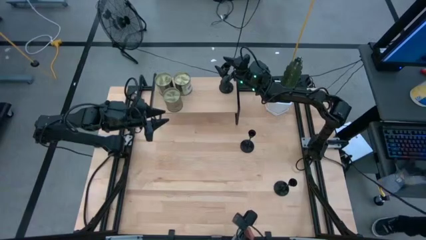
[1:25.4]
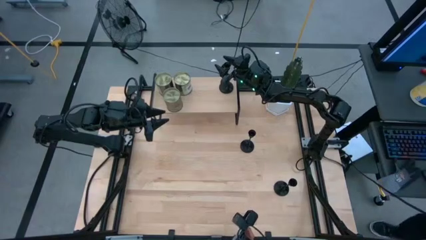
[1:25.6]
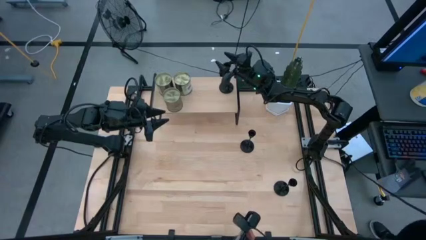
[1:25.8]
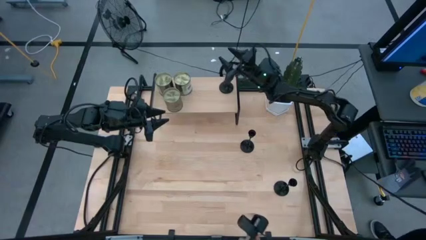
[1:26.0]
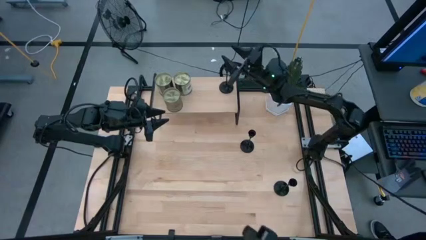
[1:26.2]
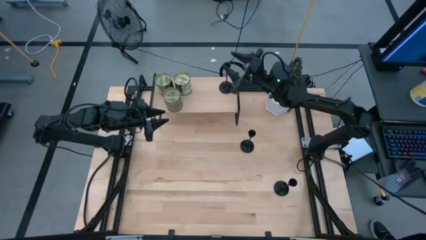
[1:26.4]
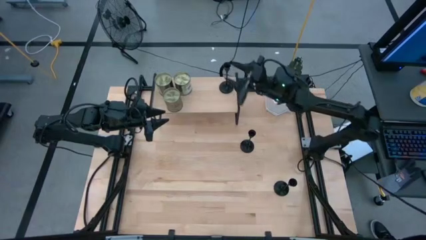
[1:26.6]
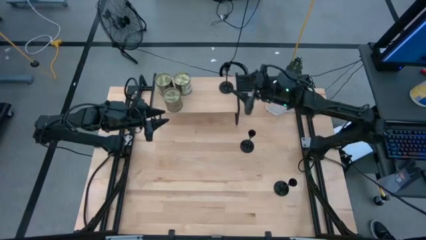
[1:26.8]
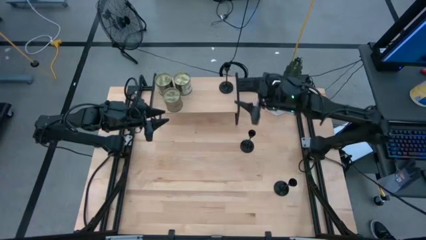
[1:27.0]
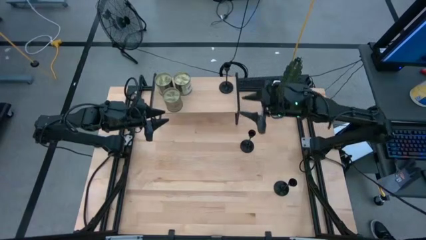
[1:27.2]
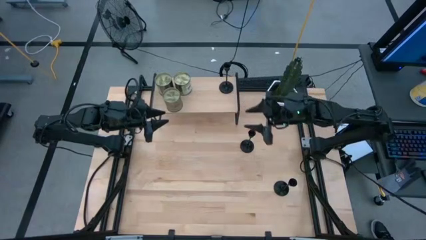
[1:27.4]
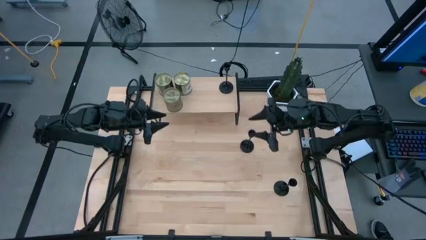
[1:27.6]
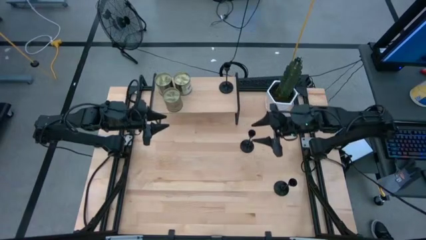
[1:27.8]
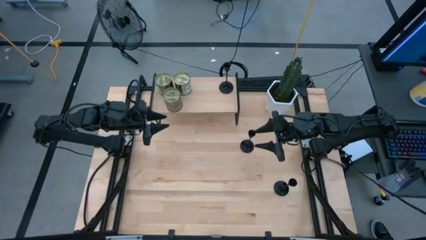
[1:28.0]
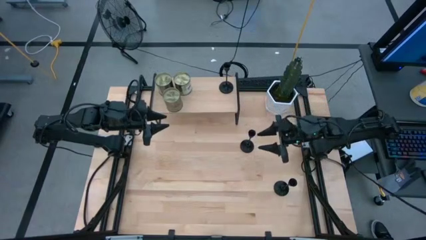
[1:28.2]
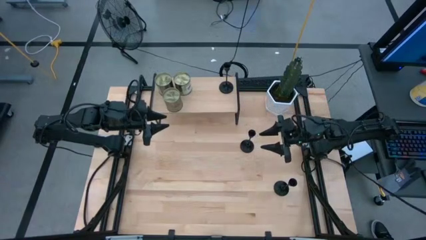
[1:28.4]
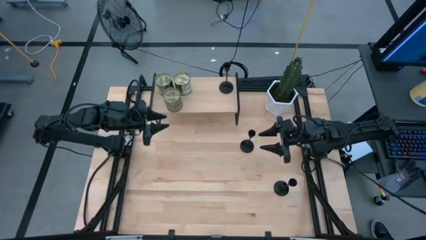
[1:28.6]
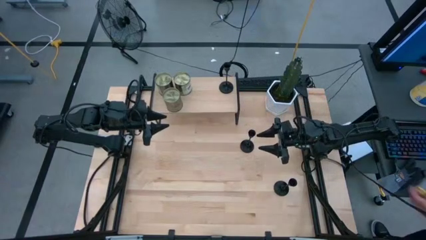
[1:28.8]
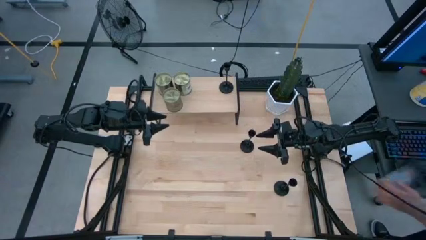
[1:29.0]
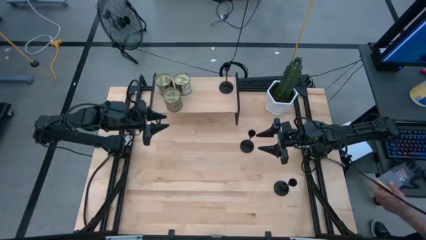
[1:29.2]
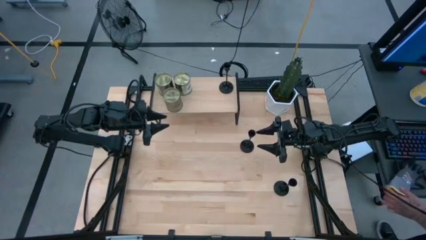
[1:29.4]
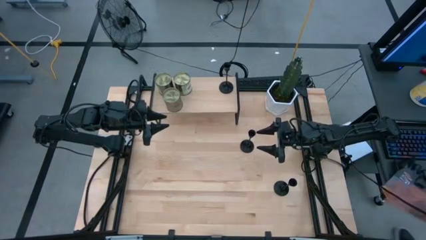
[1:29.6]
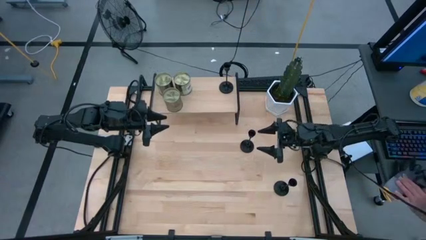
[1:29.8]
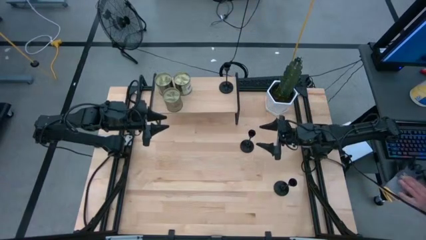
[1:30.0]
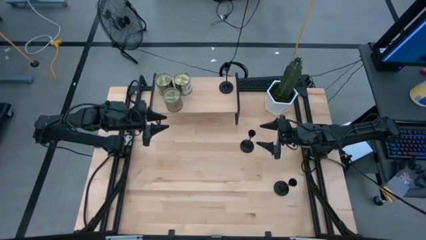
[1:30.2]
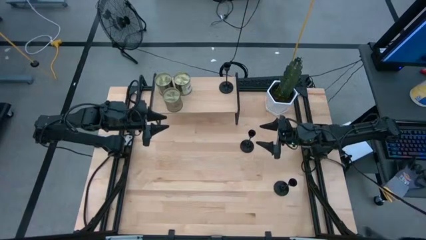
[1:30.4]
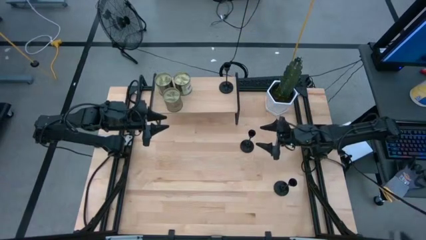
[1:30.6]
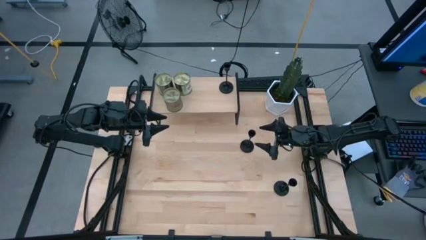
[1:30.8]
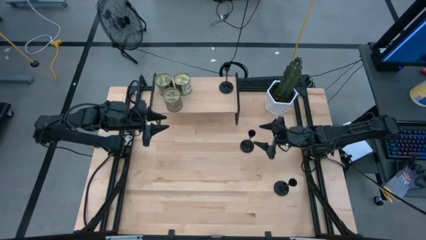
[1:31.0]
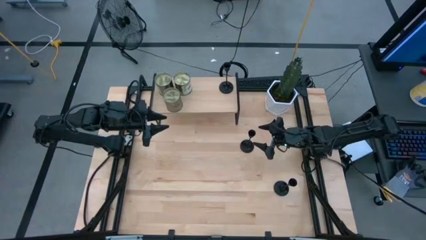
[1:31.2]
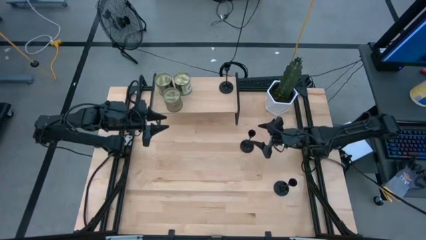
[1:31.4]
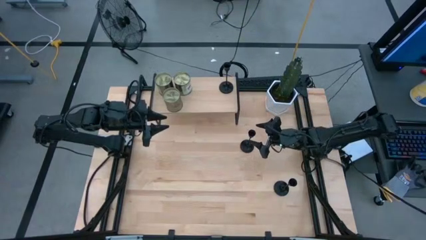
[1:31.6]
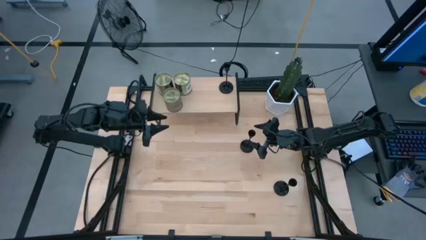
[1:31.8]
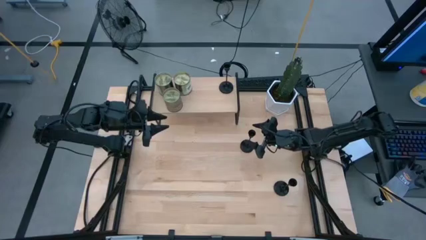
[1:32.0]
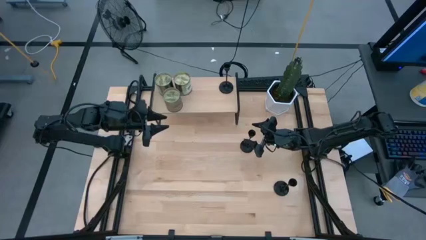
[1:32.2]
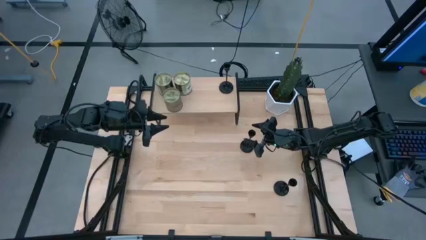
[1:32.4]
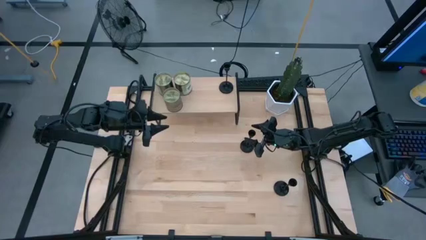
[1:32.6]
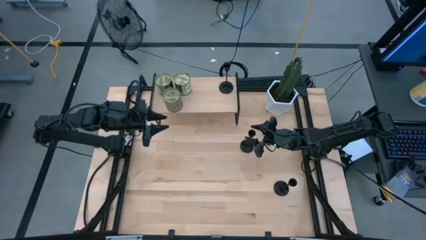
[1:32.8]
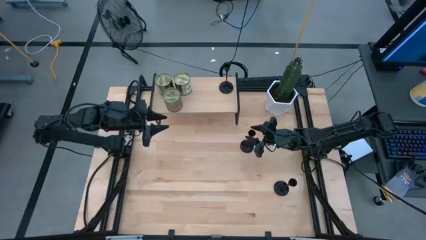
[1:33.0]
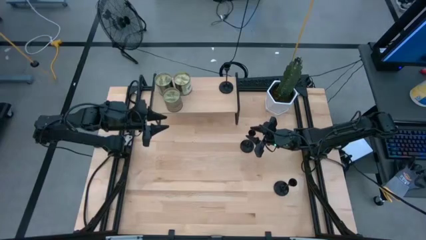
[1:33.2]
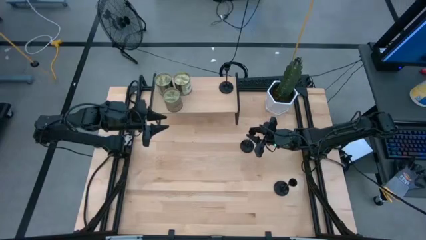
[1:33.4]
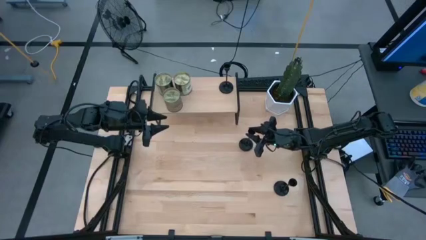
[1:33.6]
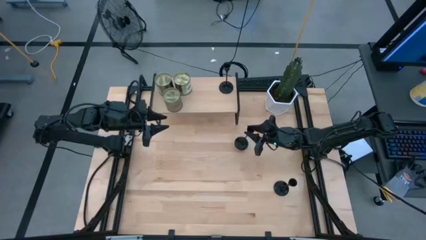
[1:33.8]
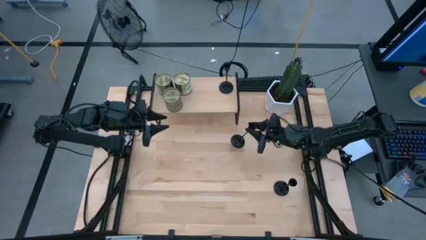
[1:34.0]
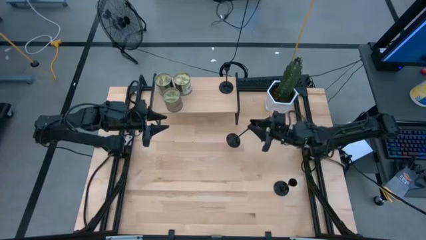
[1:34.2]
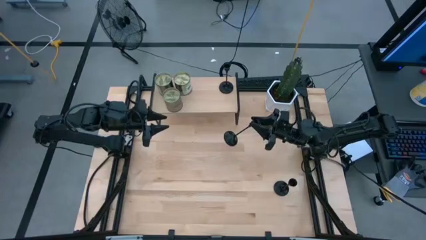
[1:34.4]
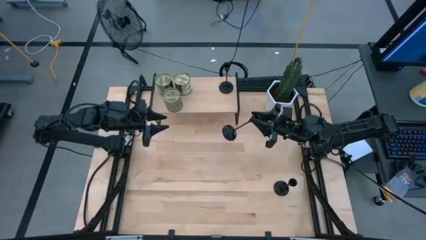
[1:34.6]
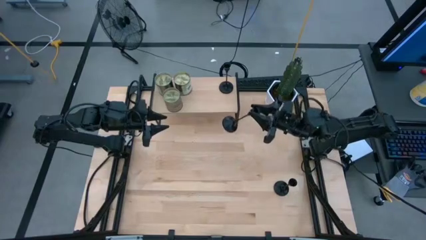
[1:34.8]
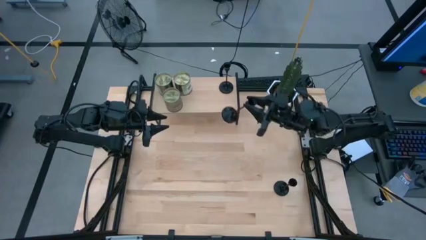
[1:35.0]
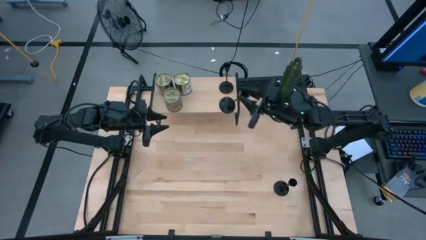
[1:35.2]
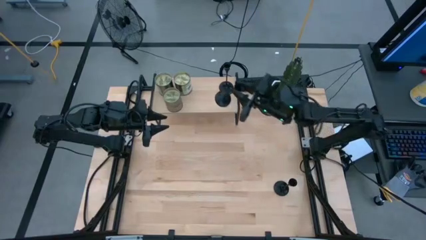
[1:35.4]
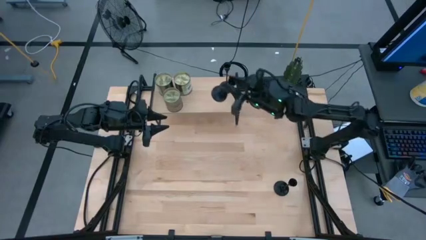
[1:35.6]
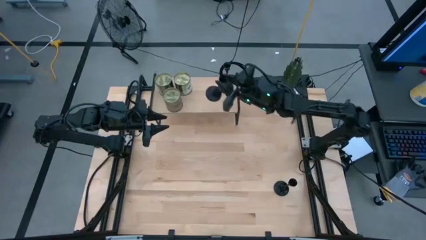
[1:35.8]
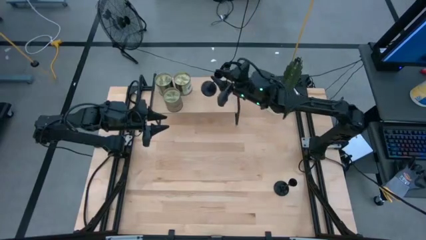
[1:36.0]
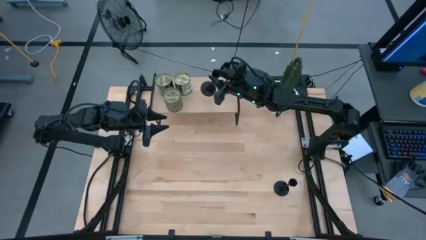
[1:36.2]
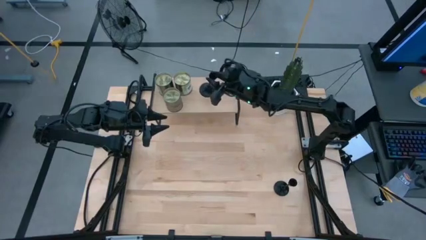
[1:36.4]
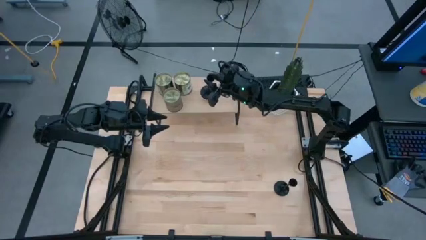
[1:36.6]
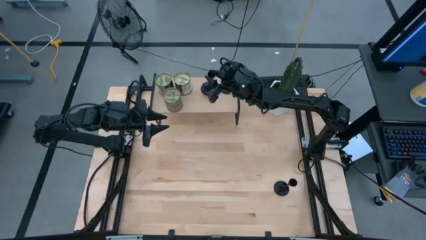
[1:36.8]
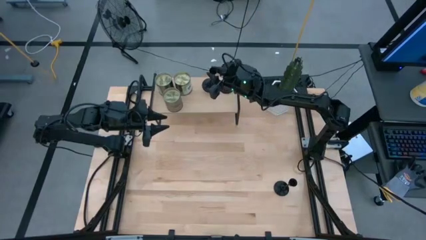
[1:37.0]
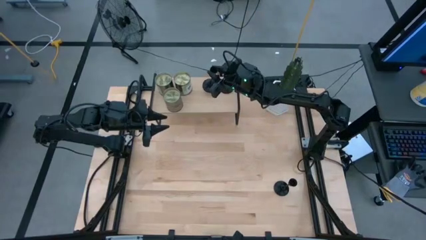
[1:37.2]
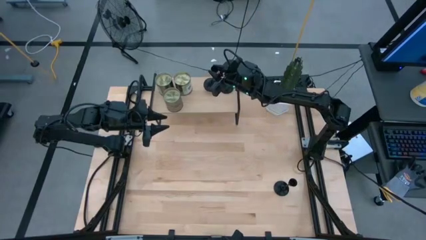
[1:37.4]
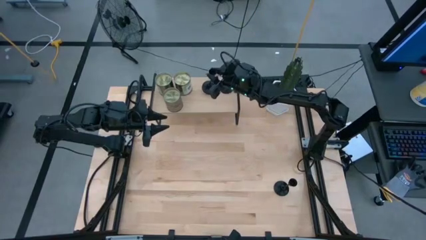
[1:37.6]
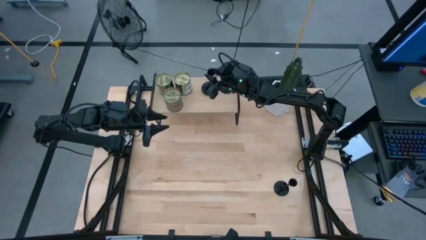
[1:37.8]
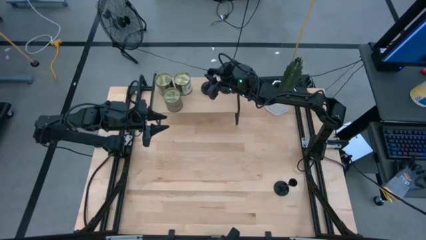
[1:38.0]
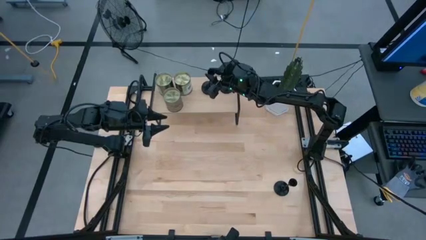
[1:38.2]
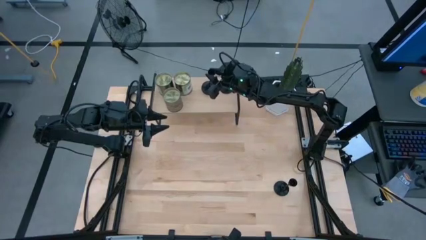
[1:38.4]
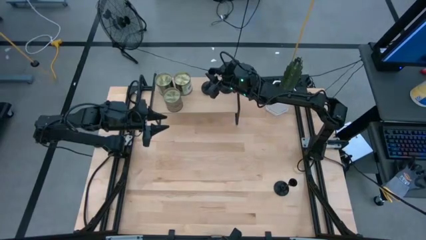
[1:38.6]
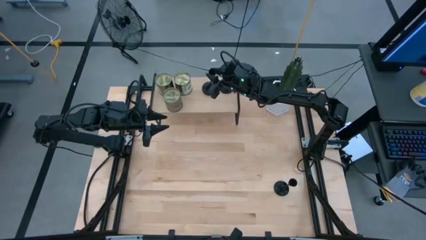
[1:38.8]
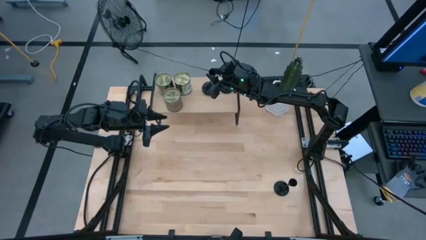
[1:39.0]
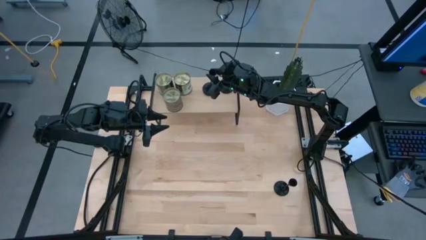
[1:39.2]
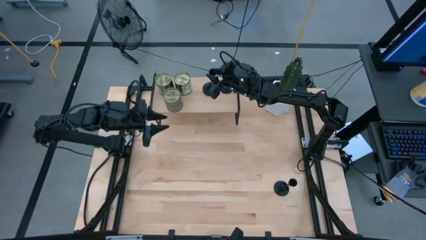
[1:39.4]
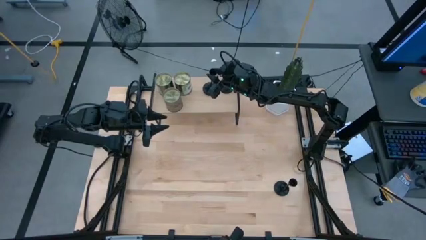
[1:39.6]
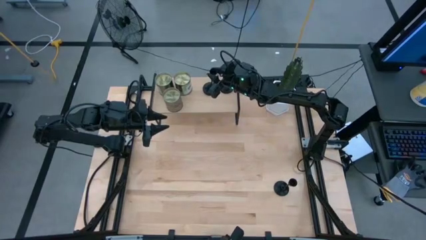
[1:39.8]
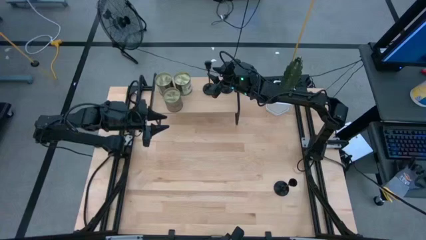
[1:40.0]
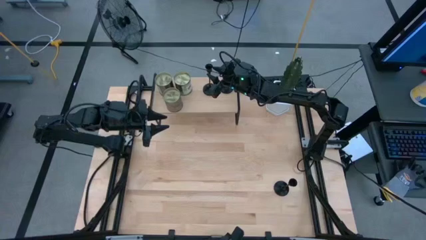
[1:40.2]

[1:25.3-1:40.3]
Task: Pick & Place candle stick holders
Put the top black candle holder on the shelf

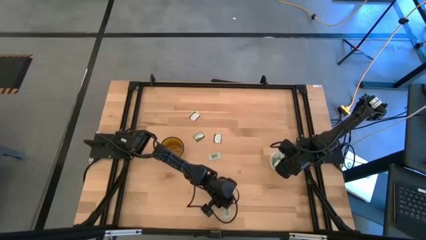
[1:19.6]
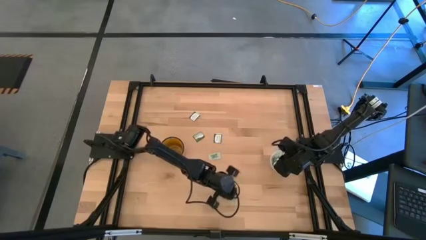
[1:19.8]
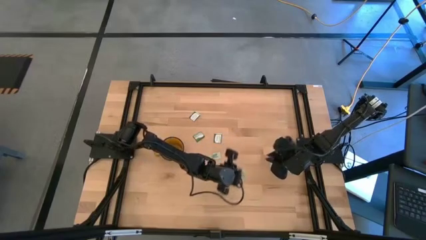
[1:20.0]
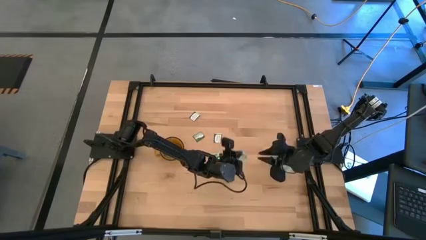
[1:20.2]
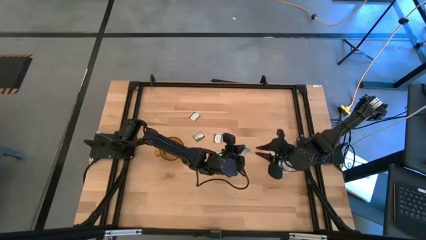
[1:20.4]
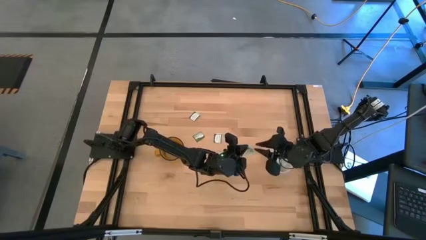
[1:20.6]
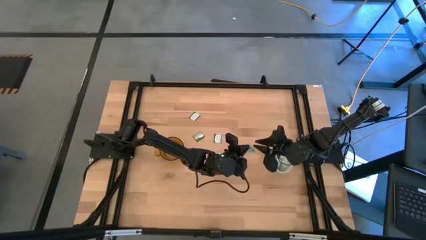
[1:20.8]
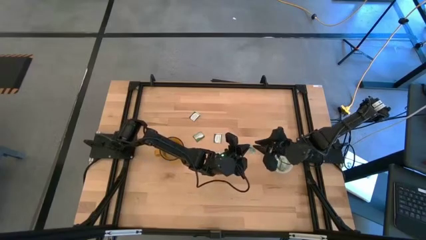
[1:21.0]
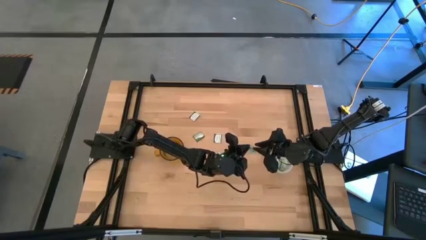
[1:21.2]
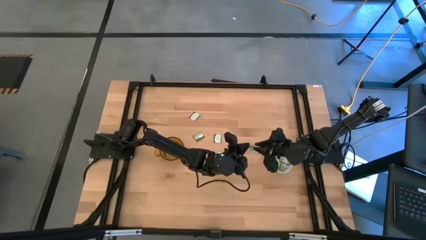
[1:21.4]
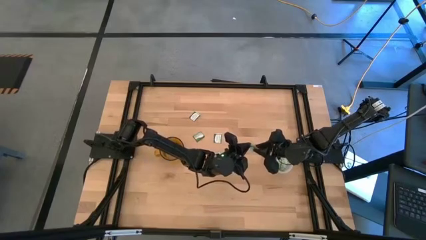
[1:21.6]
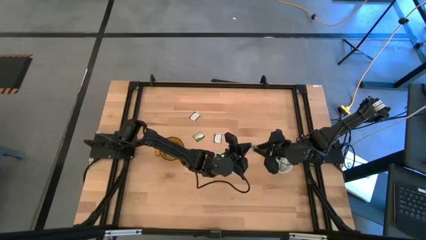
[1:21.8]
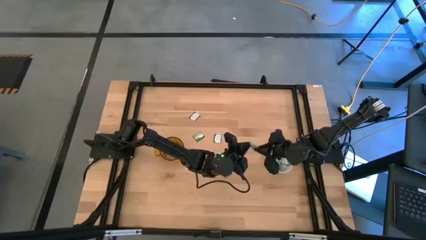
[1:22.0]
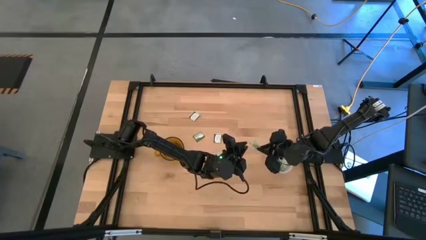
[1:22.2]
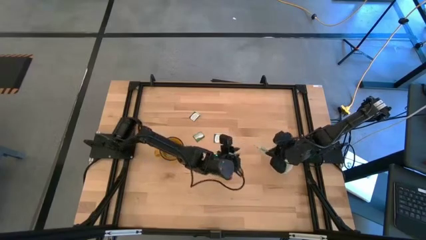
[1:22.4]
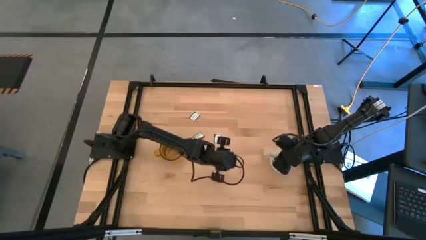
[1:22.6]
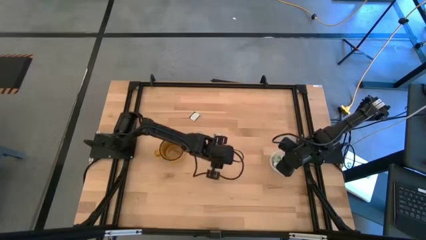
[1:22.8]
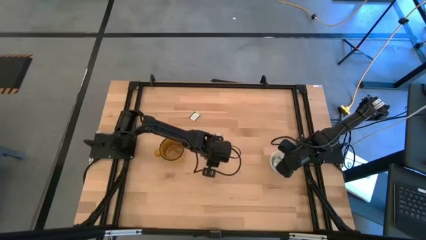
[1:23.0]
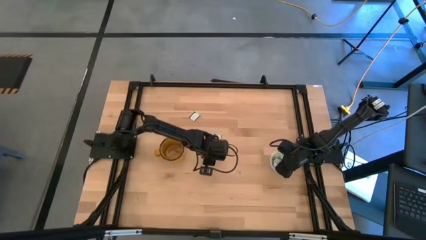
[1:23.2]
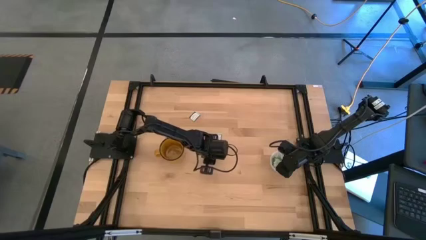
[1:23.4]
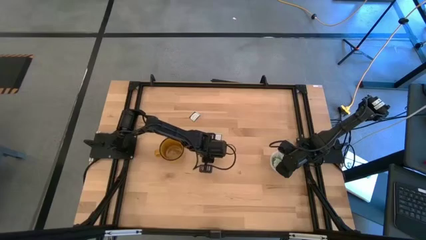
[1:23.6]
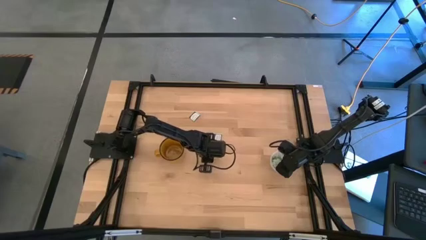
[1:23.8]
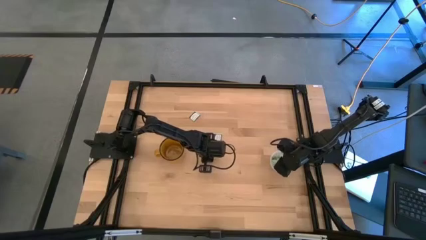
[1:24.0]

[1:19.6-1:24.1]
Task: Pick and place Stevia / Truvia into bins
Put the green stevia packet into the transparent container
